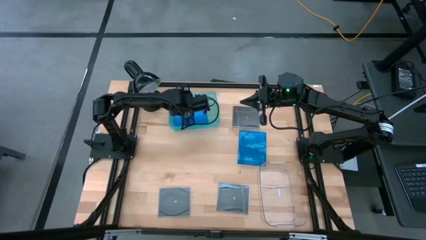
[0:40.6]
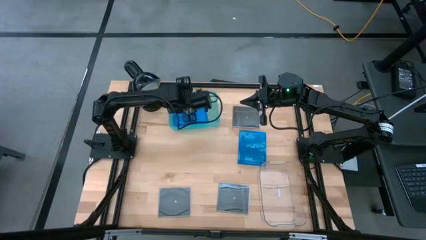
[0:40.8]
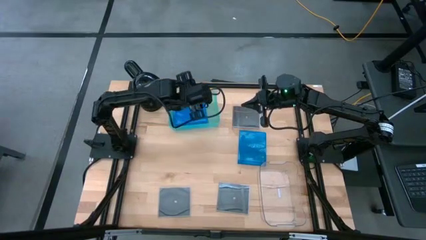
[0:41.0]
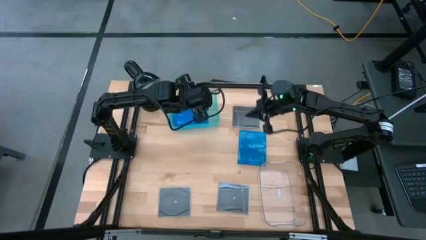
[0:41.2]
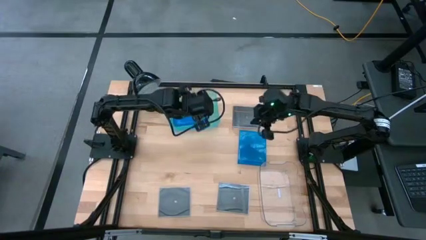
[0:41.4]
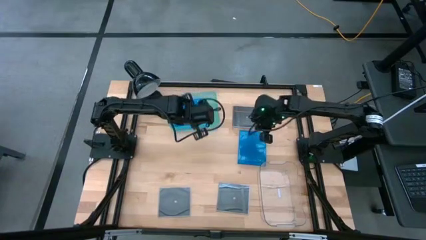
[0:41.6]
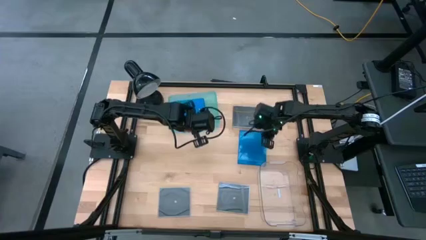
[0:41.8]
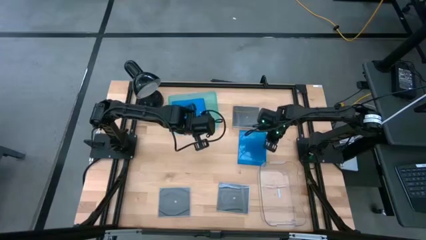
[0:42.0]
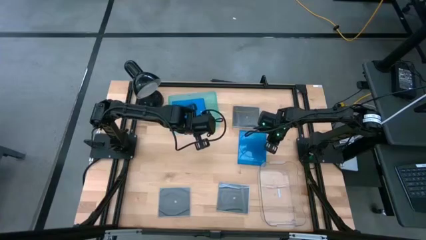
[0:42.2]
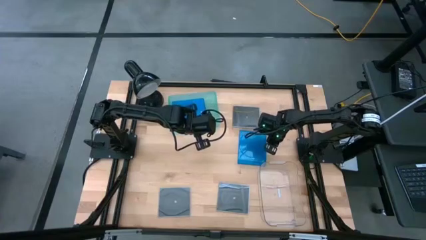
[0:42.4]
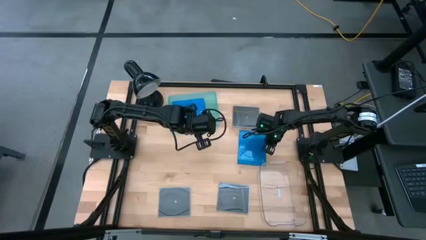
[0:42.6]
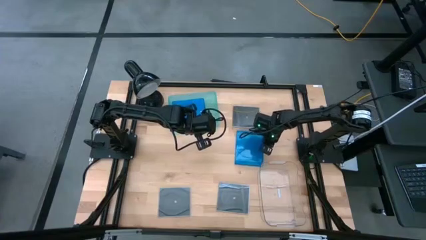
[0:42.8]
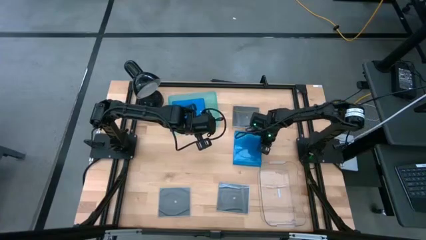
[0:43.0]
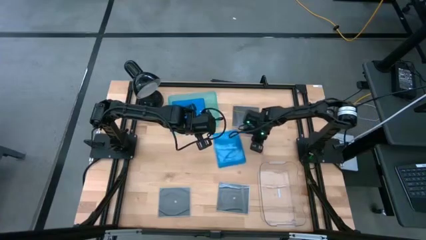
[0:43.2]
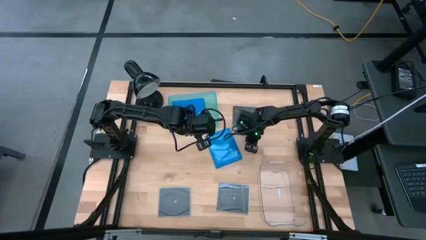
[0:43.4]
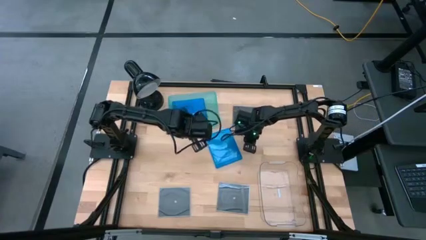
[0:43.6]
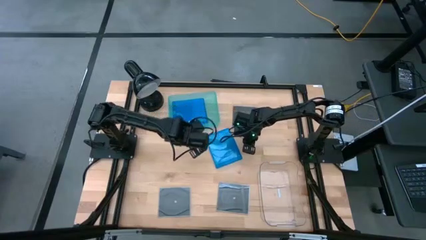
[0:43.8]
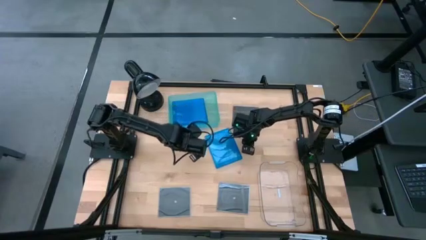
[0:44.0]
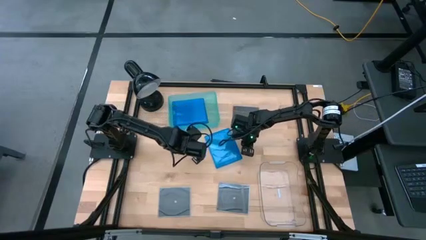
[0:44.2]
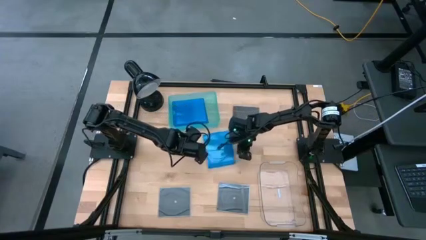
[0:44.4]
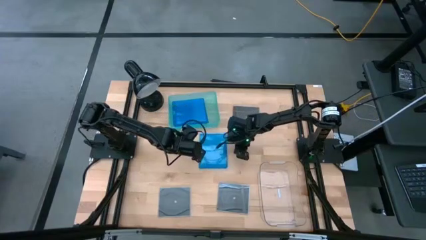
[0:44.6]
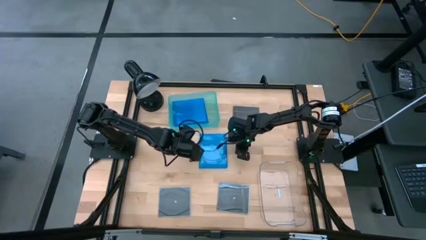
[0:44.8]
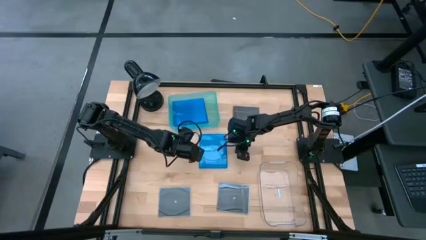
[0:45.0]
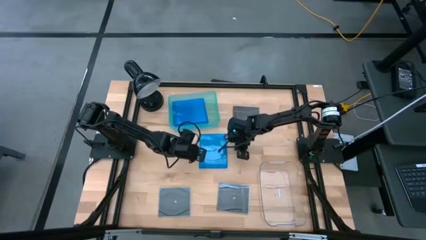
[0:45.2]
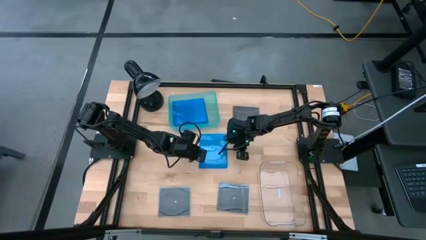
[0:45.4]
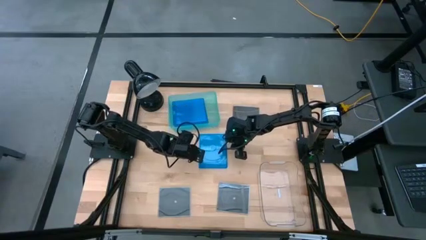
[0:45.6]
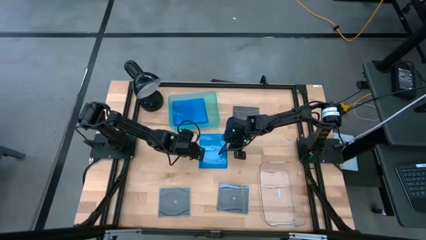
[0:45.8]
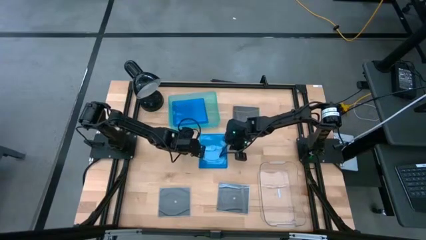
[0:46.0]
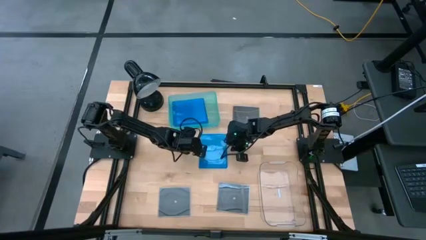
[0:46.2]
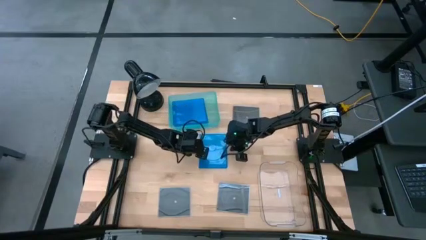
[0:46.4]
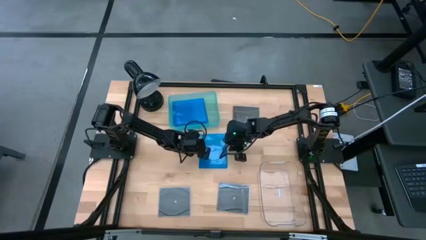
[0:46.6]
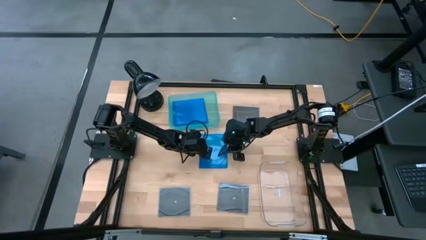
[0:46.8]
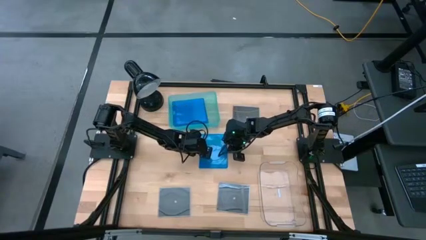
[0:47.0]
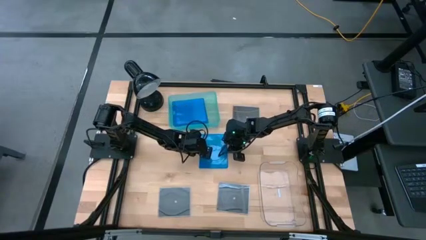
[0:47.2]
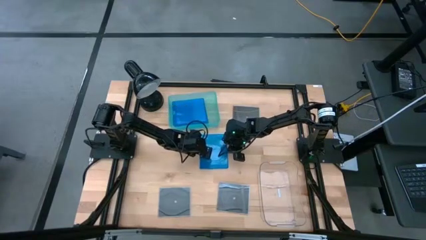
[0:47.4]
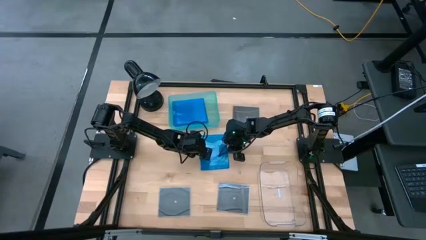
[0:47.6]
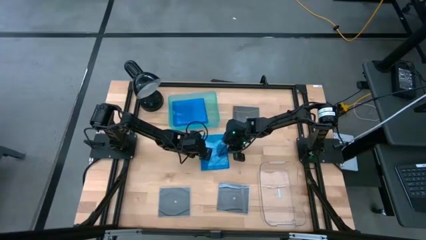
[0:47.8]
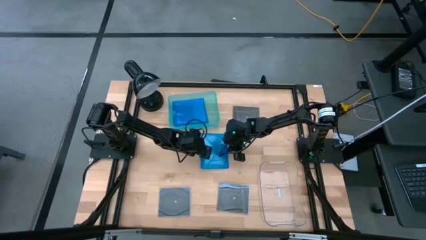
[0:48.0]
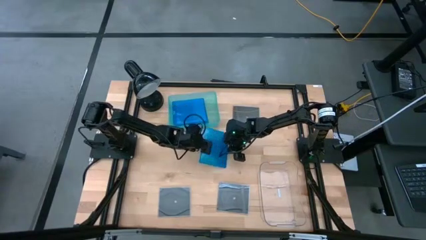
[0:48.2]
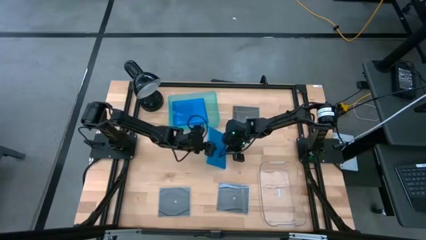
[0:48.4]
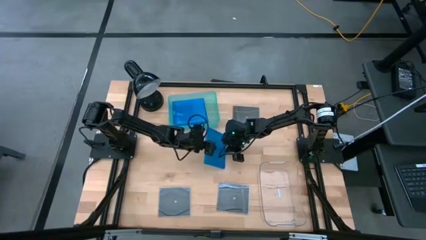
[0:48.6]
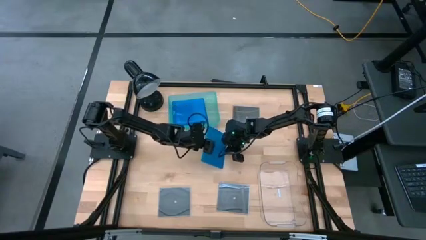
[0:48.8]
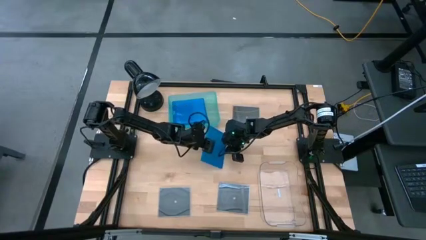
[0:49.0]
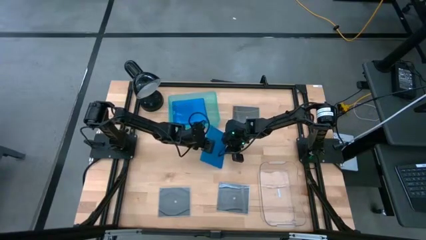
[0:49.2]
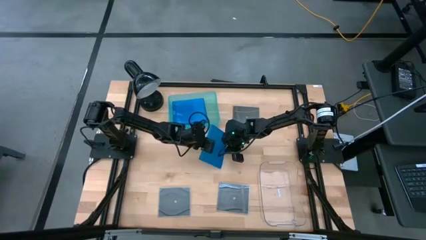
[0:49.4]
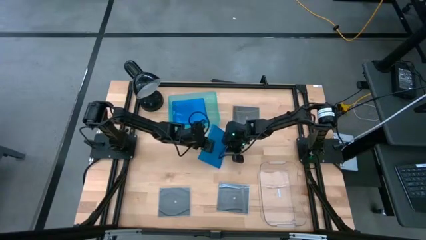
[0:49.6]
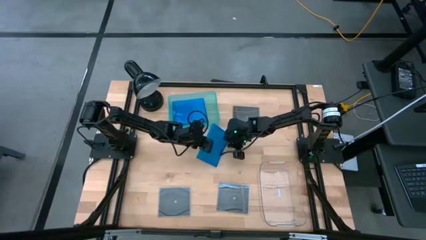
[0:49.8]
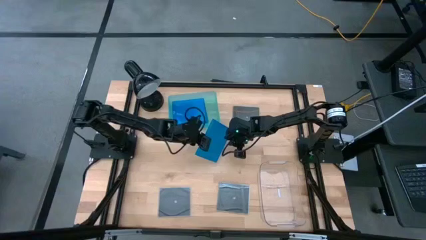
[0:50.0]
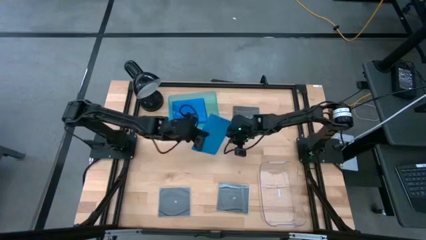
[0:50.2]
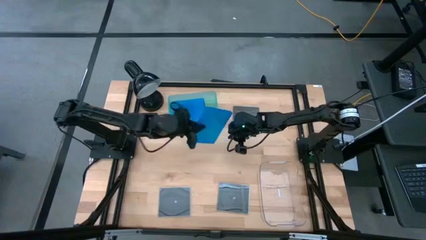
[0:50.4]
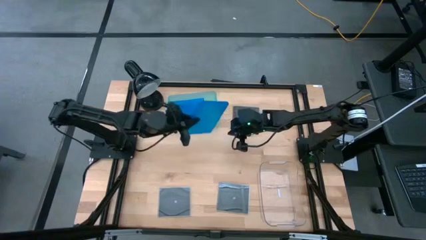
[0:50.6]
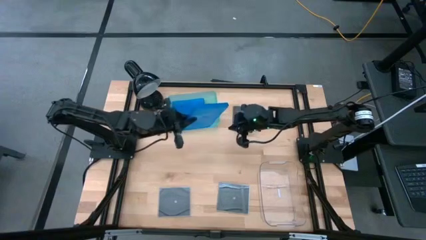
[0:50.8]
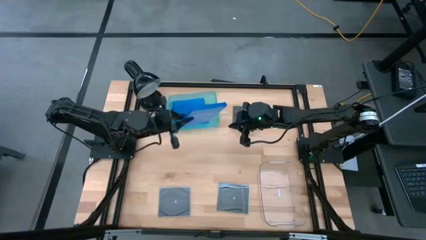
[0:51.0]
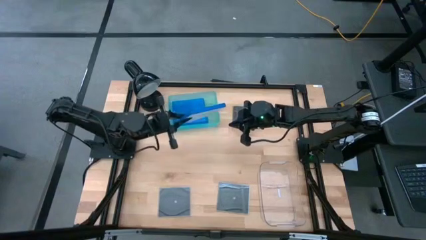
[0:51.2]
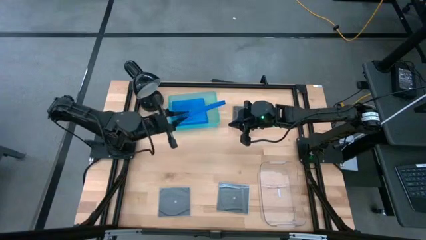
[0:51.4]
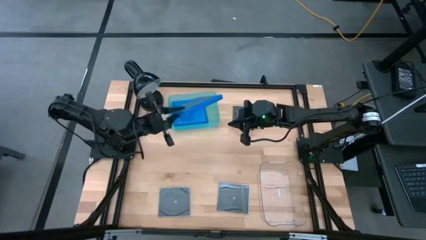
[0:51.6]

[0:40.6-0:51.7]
Task: Pick & place jewel cases by type
Put the blue CD case into the green bin

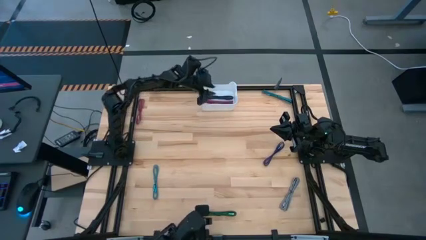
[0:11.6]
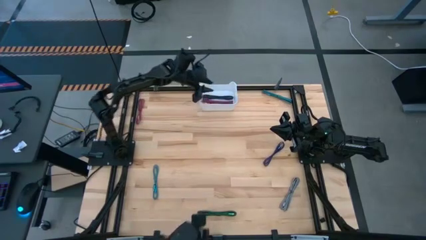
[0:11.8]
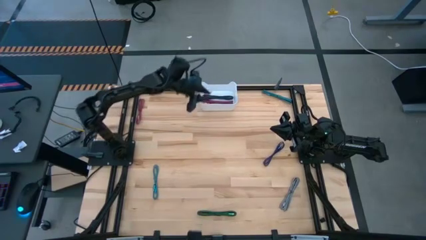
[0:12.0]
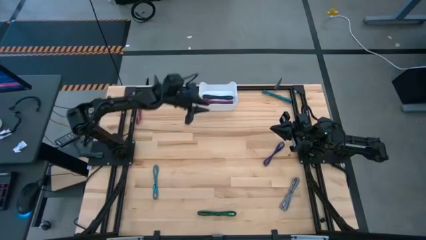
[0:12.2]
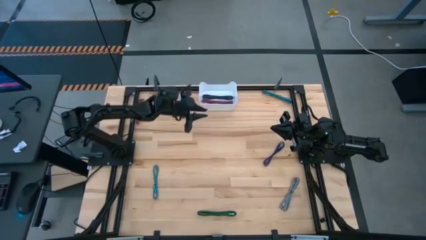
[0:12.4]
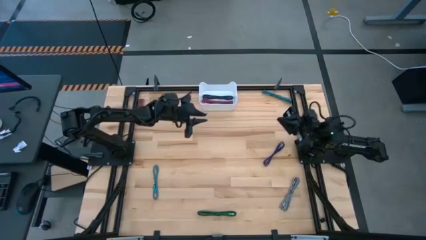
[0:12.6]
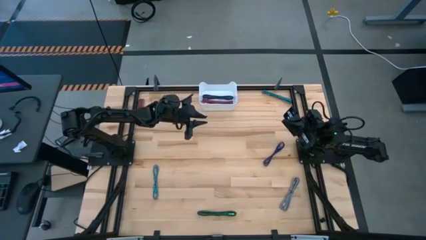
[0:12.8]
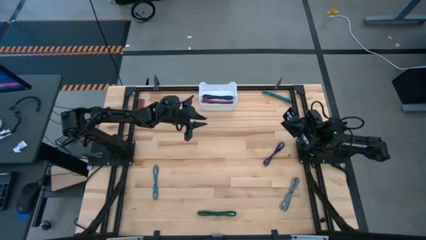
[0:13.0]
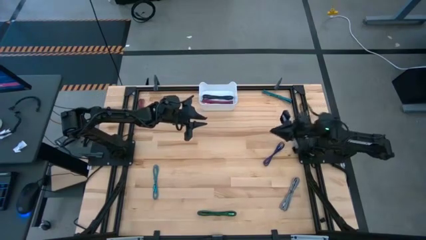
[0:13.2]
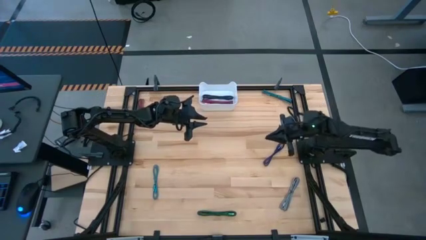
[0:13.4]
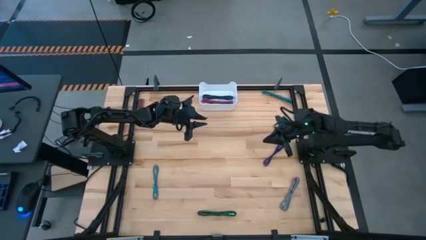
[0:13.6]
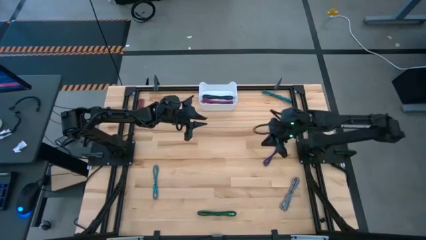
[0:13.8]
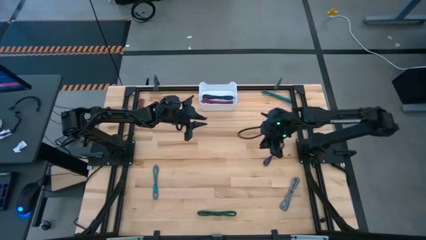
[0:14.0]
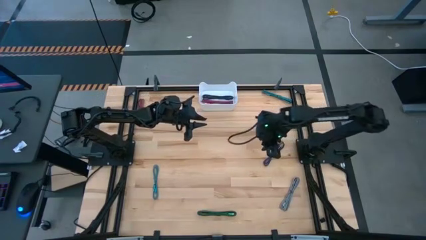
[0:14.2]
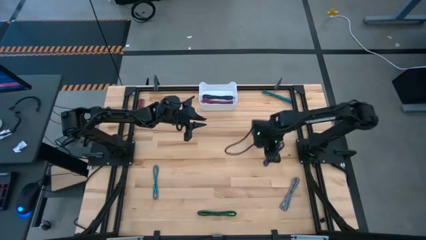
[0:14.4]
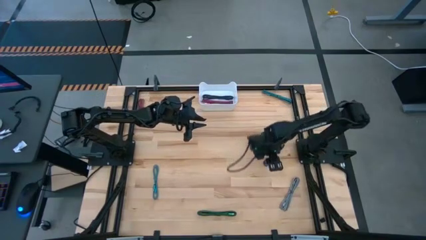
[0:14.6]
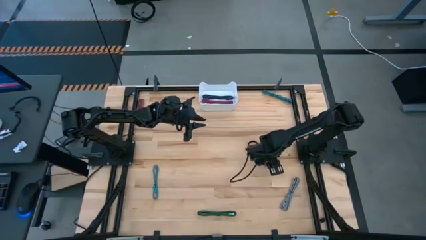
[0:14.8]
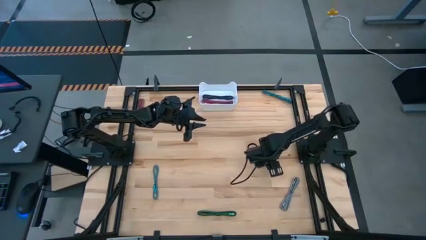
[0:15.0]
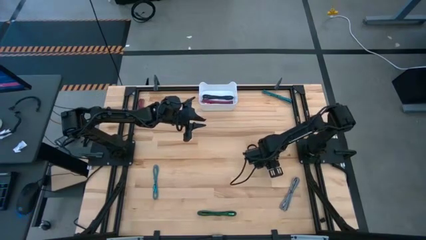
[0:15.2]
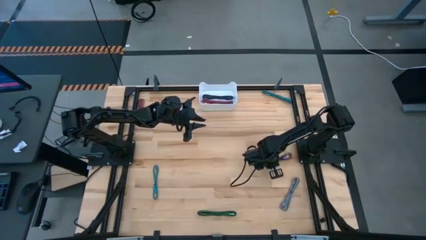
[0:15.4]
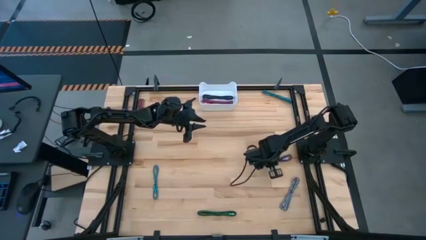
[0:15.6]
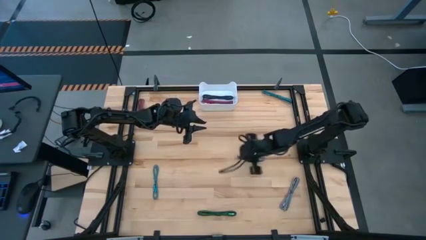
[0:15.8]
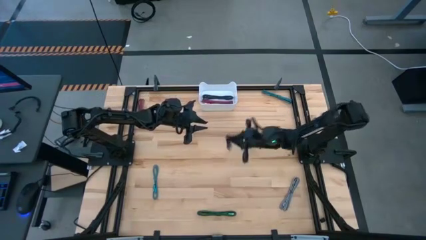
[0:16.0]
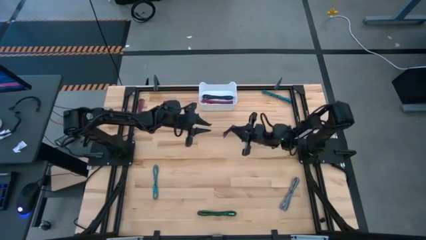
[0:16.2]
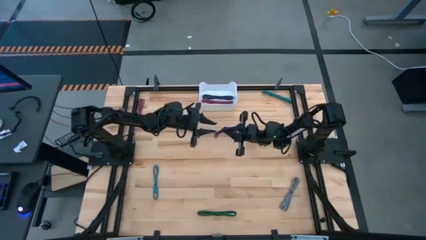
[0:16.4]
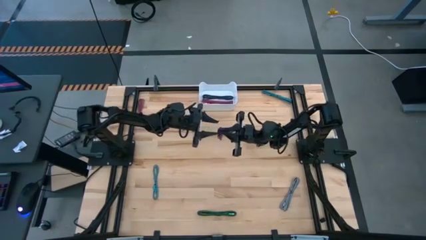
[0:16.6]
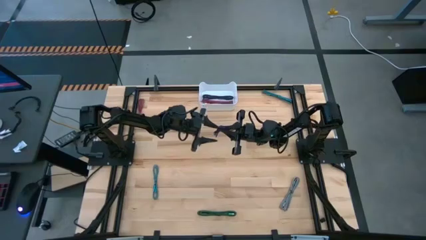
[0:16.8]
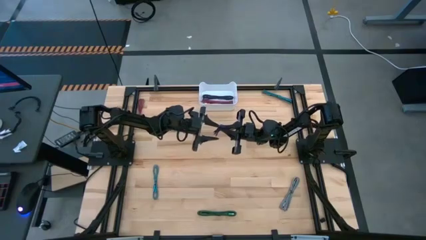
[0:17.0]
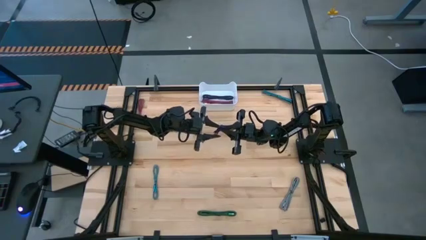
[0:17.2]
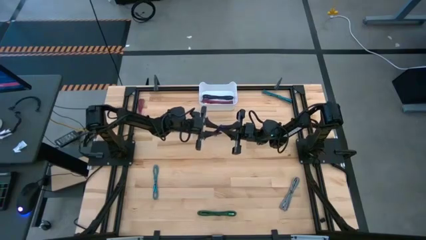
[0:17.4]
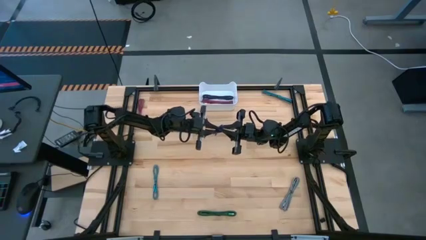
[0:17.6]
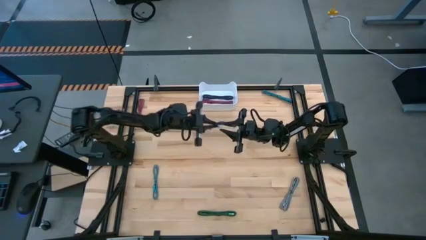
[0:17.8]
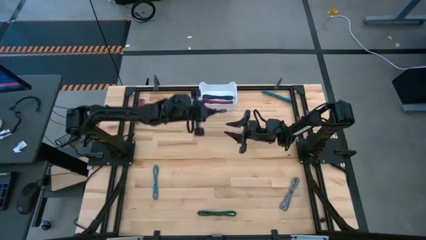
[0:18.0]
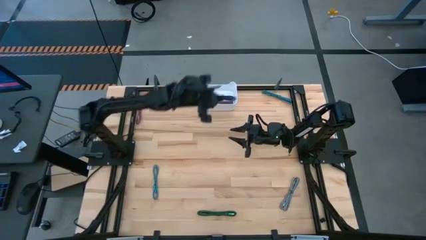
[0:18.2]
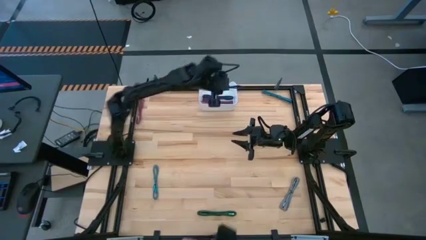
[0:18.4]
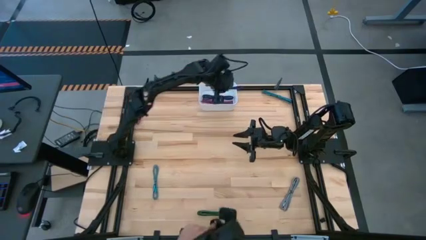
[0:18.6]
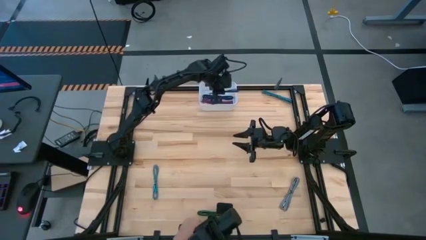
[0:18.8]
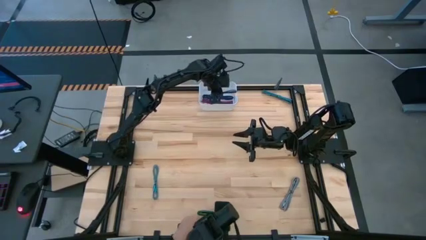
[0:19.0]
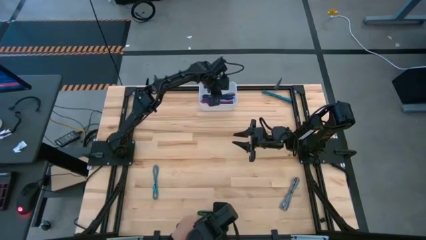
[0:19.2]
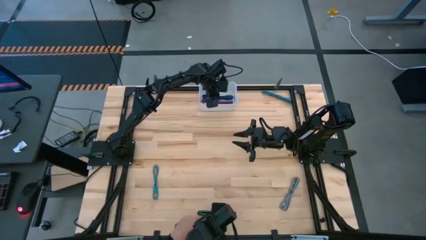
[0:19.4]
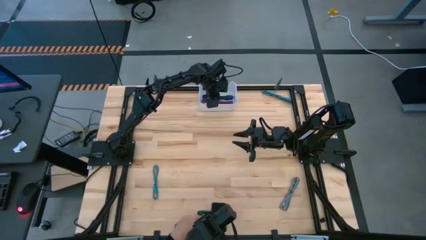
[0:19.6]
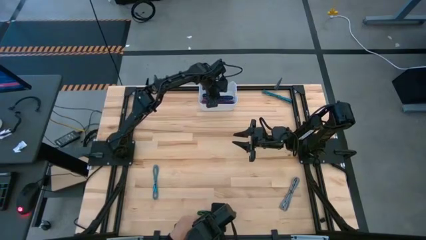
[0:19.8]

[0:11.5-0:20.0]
Task: Pick and place USB-C Cables
Put the blue charger cable into the white bin
